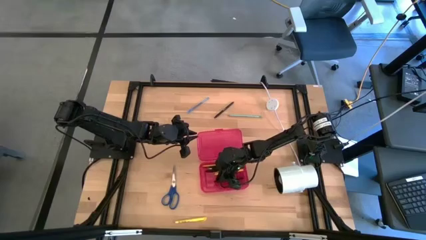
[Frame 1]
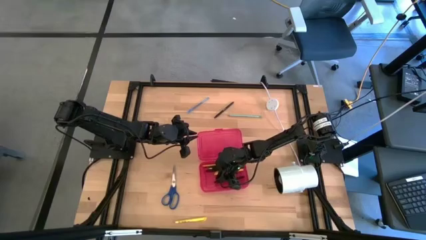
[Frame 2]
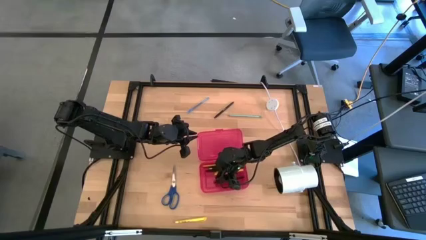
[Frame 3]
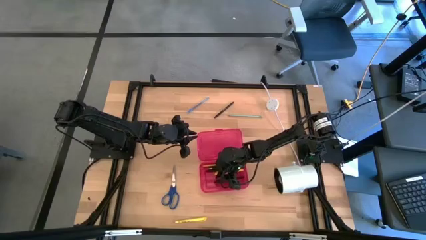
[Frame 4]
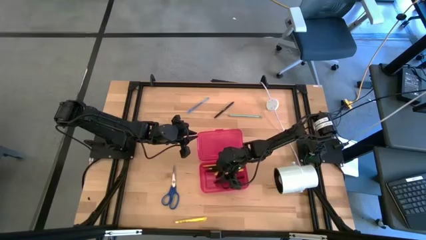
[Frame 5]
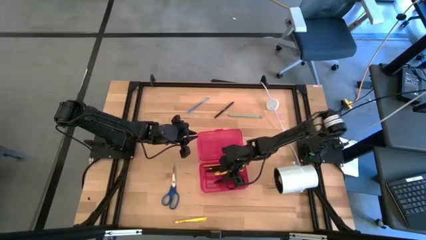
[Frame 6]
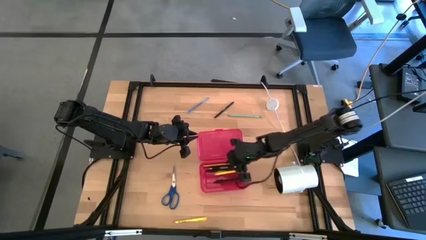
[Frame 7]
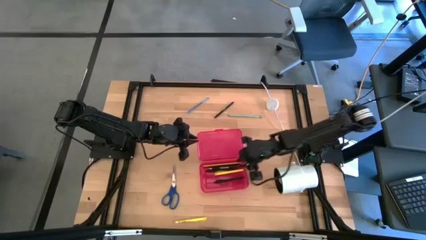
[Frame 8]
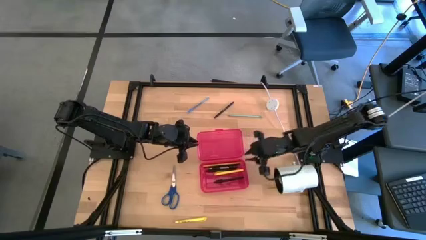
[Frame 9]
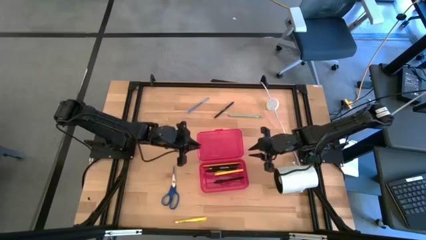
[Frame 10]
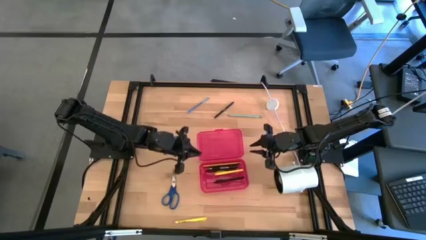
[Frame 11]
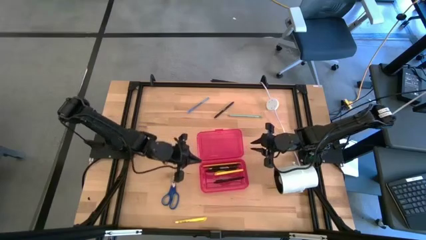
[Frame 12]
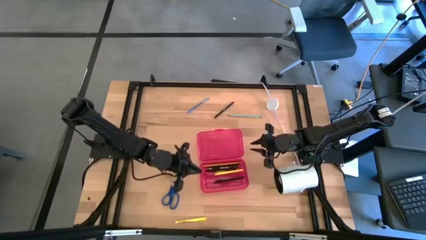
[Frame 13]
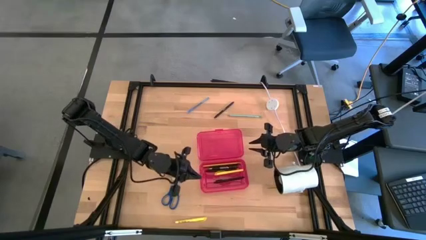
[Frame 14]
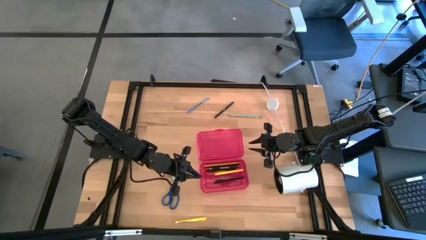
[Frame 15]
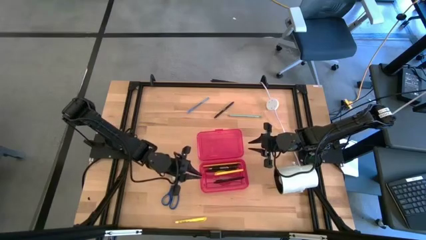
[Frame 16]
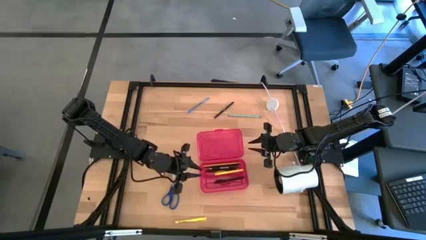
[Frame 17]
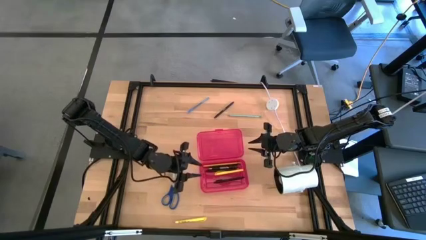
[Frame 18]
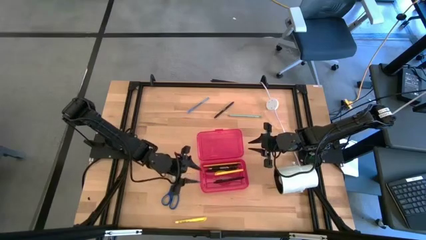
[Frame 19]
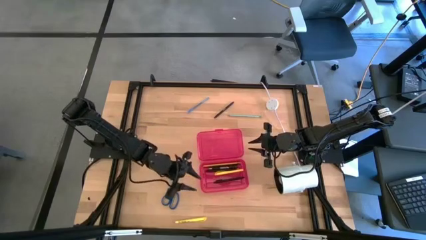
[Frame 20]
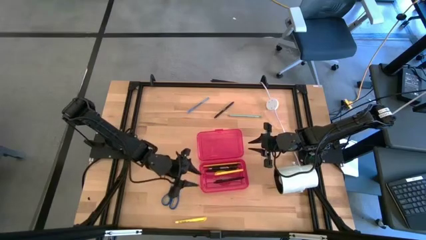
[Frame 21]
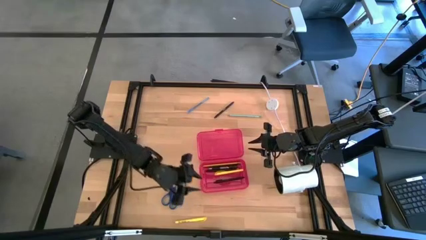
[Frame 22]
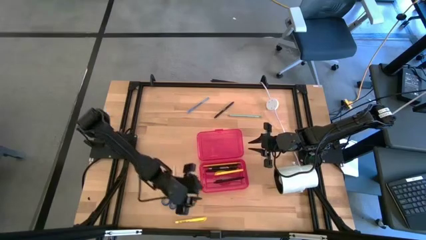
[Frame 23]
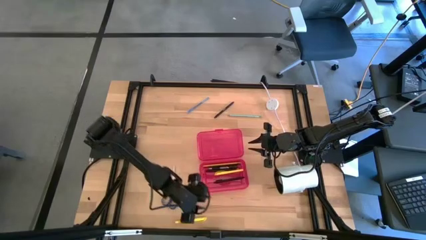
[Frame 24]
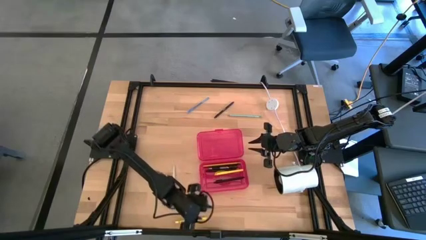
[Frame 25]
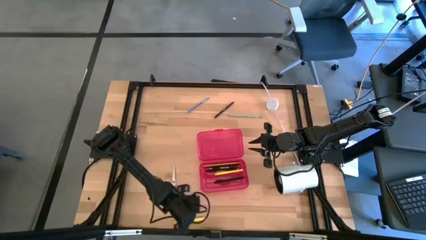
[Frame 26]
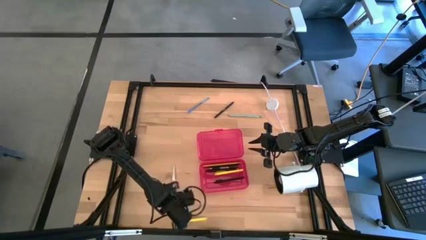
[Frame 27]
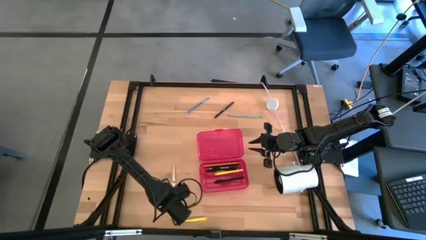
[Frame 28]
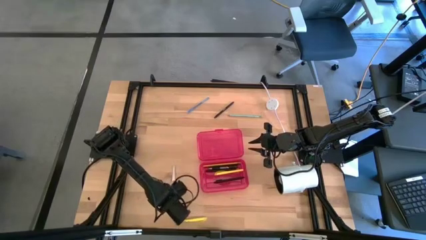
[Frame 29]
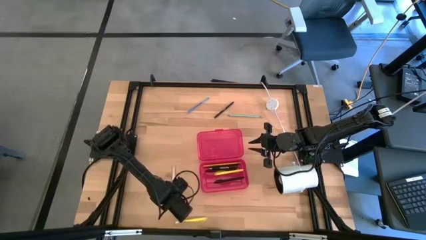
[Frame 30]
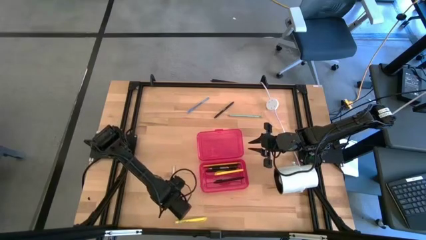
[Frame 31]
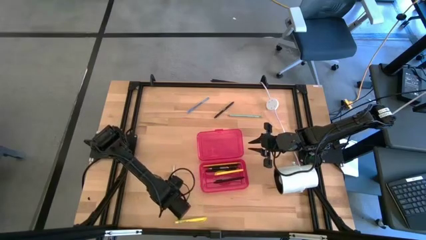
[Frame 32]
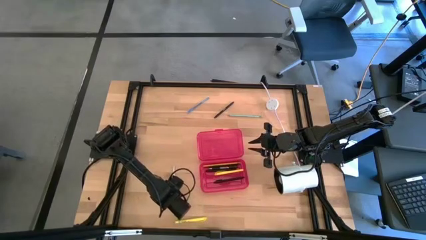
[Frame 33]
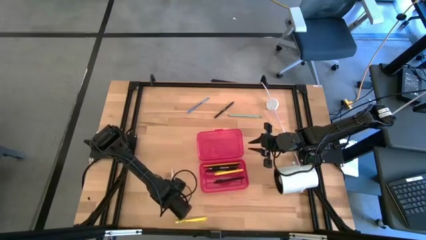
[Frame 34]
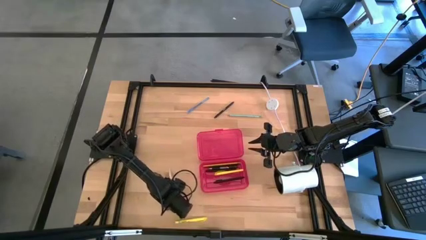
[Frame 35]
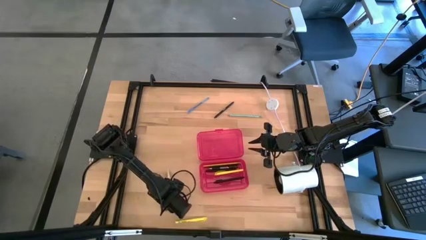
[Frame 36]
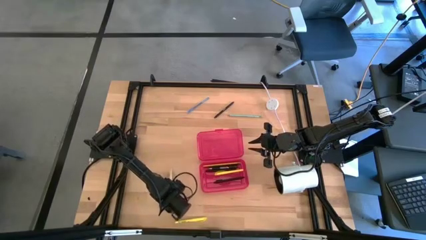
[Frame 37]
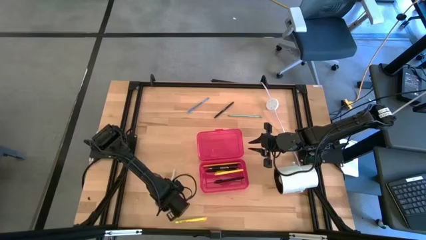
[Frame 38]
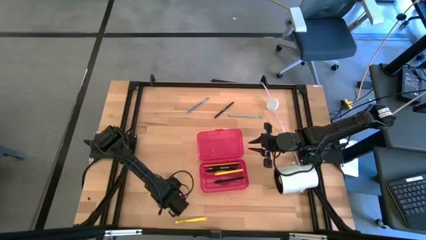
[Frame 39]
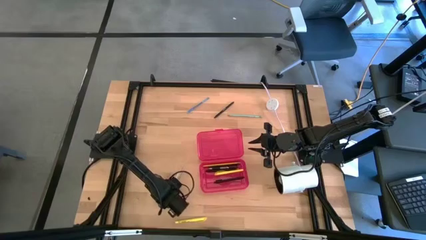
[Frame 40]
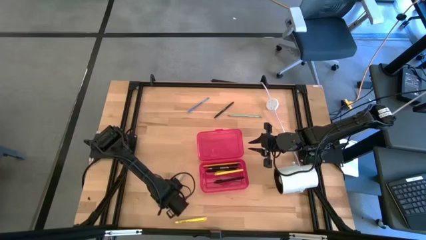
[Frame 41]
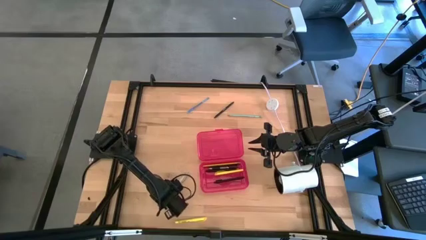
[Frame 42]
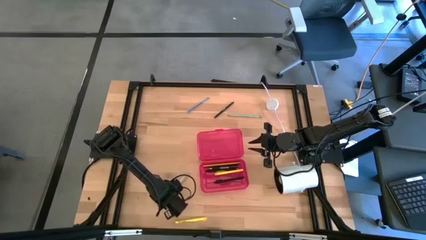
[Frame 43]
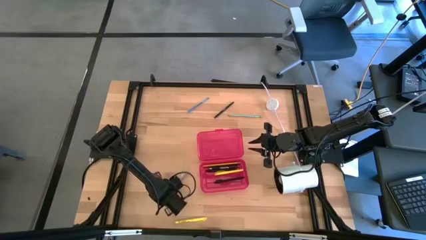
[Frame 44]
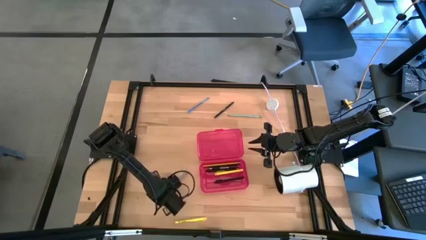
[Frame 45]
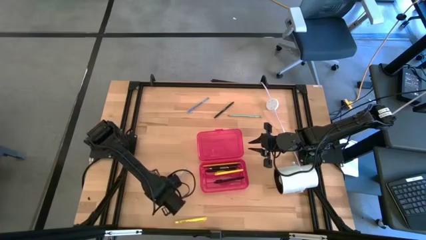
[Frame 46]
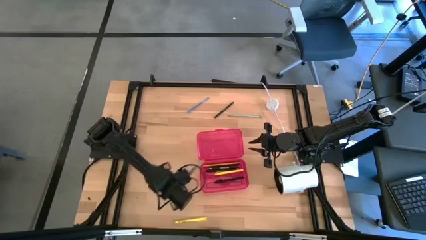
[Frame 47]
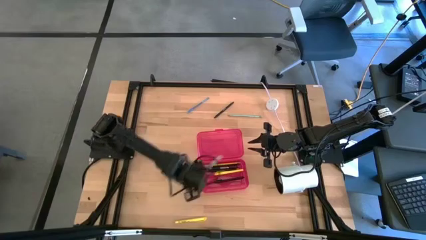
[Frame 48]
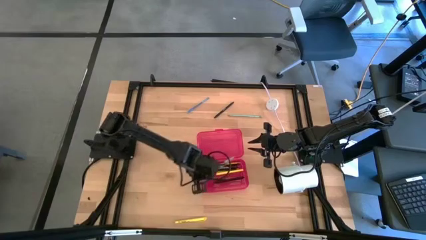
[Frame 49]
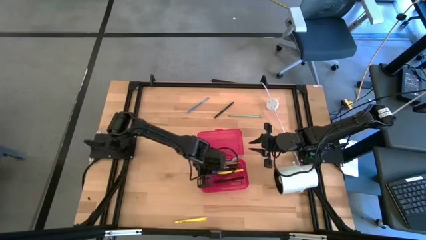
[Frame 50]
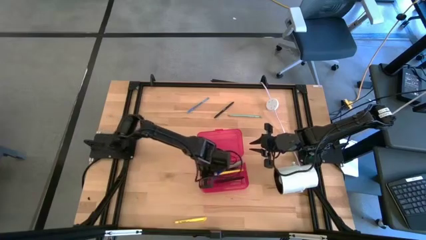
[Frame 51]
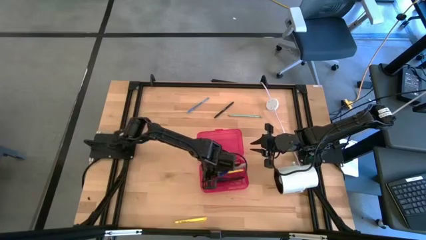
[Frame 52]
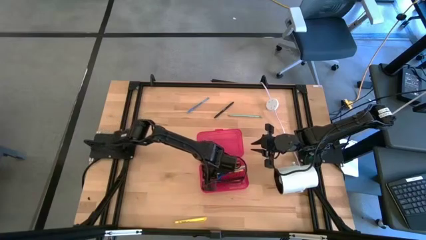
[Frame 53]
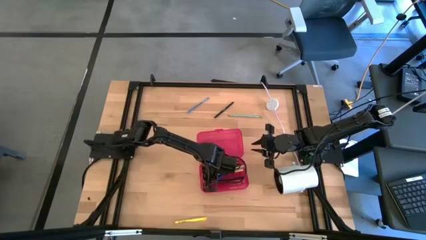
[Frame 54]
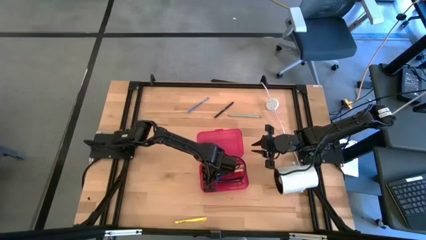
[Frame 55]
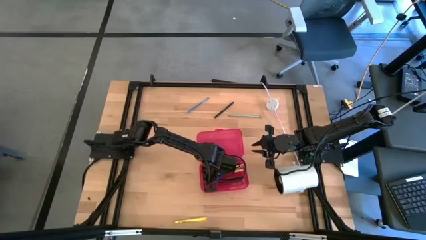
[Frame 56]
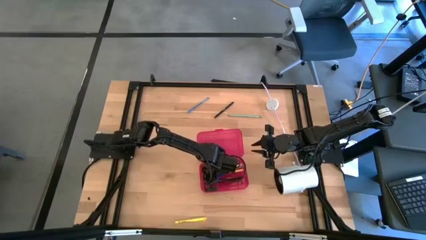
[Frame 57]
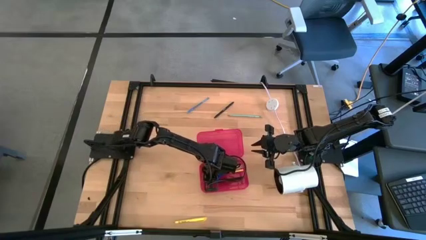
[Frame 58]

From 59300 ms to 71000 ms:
Task: Pick & place school supplies into a supply box
Put the blue scissors into the red supply box

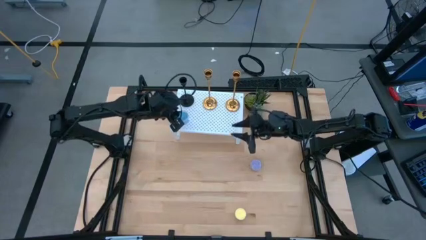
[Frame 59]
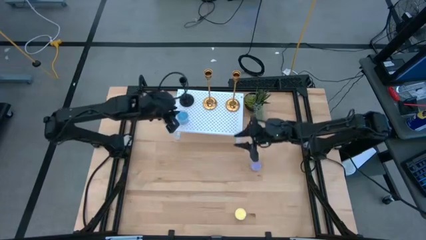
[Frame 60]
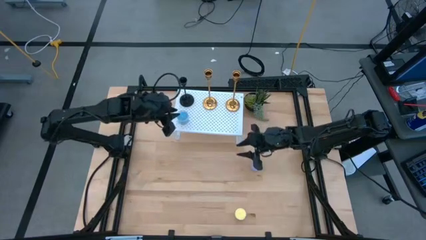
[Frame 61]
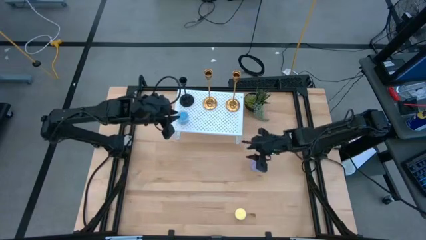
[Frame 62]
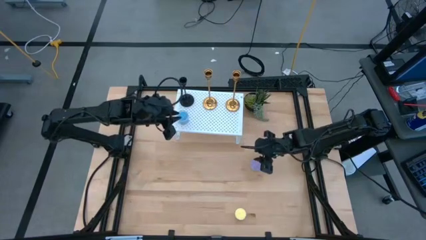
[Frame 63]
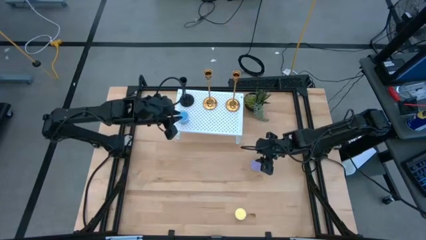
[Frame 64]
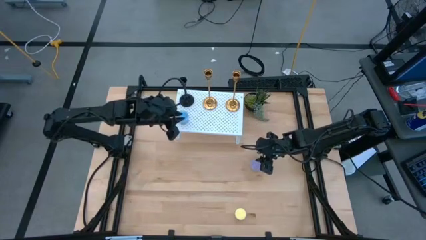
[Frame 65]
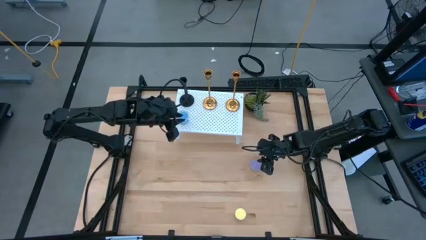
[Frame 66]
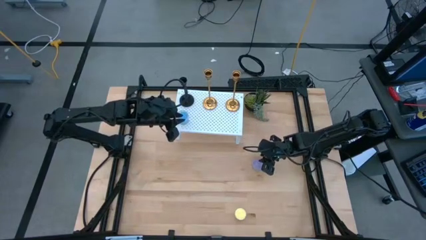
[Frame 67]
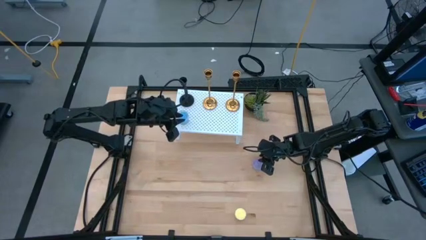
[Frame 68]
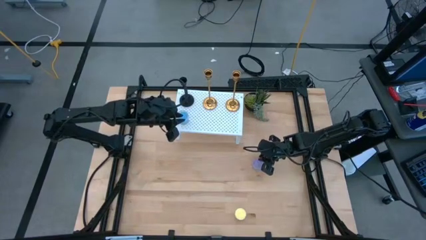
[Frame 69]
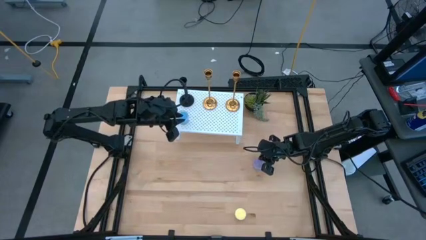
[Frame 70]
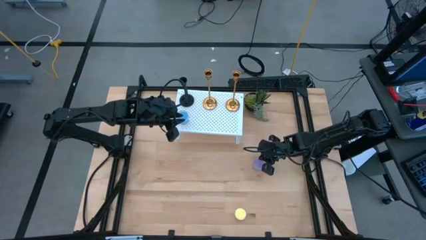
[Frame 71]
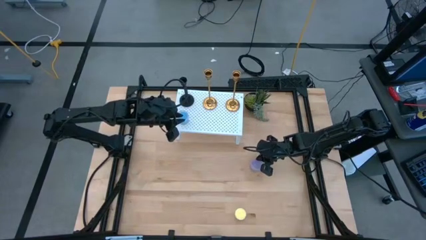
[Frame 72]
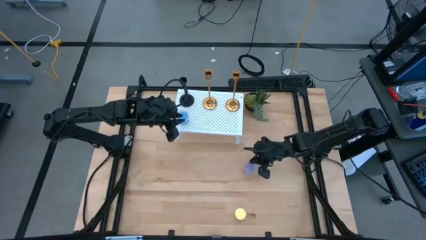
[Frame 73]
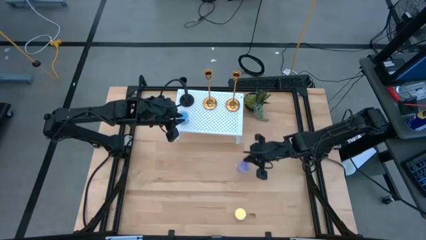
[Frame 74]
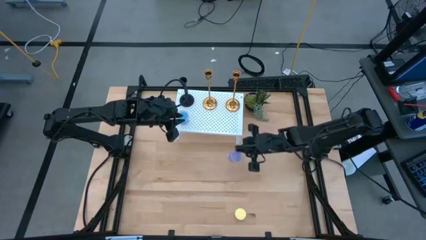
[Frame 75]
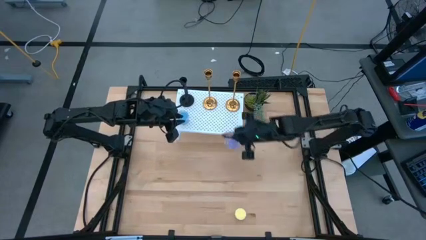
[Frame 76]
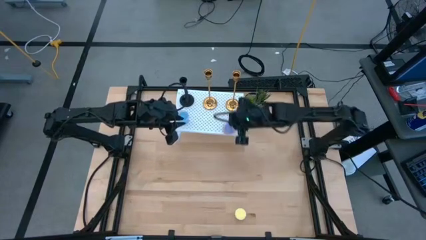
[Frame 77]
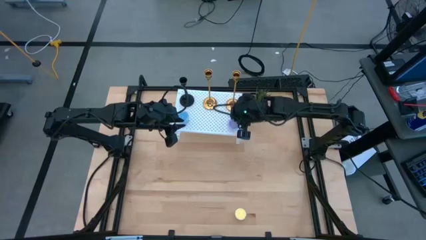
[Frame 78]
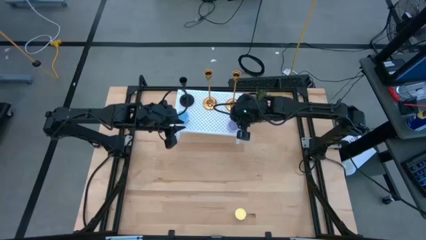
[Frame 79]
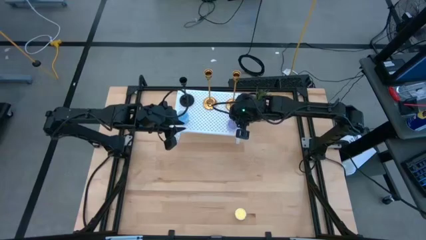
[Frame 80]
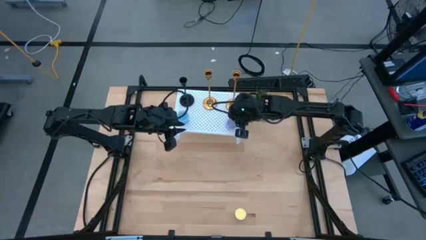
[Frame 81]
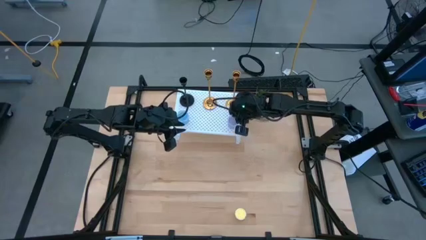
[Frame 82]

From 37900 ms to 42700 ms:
Task: Pick & Place candle stick holders
Put the violet candle on the shelf
